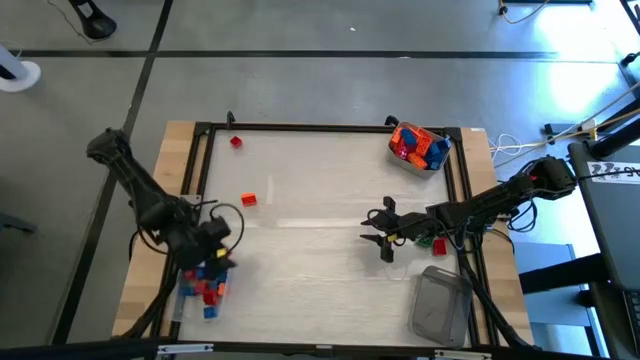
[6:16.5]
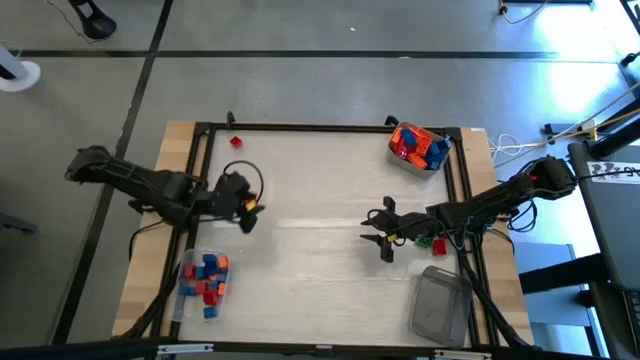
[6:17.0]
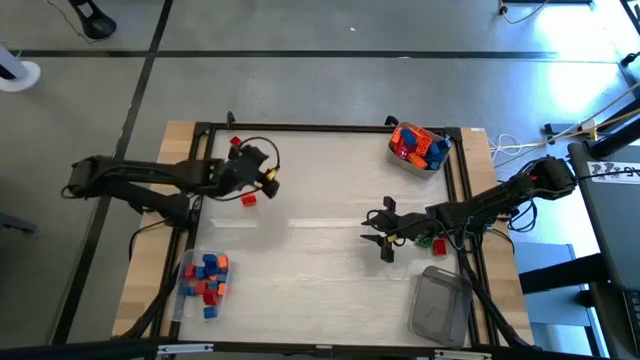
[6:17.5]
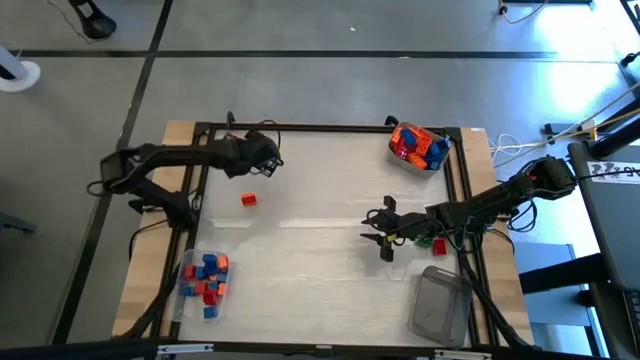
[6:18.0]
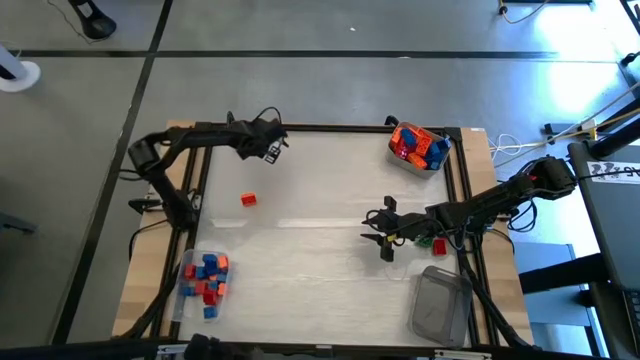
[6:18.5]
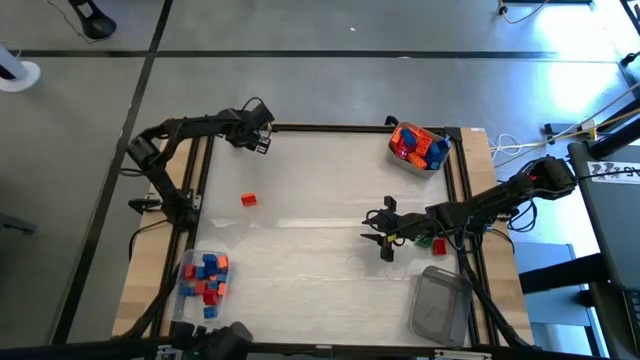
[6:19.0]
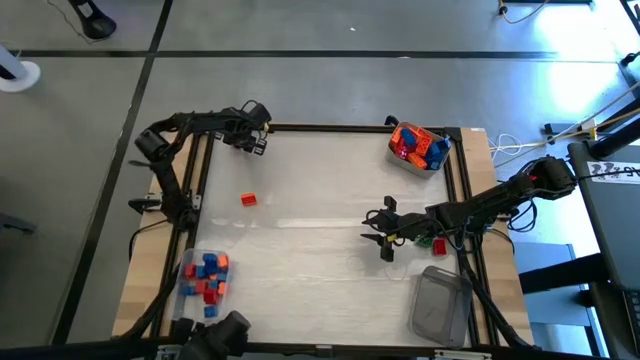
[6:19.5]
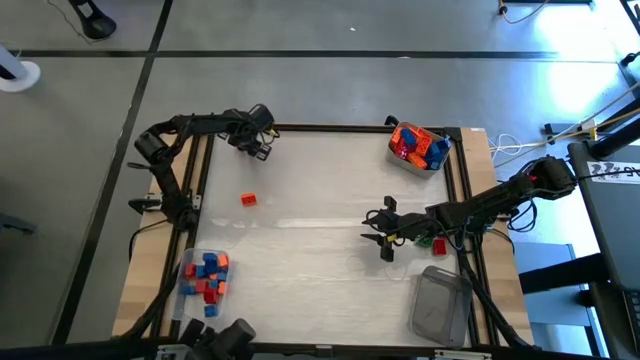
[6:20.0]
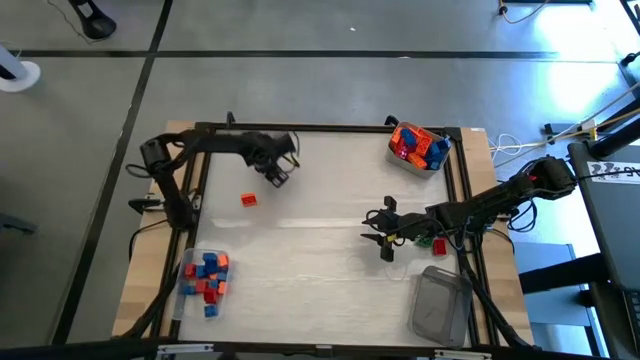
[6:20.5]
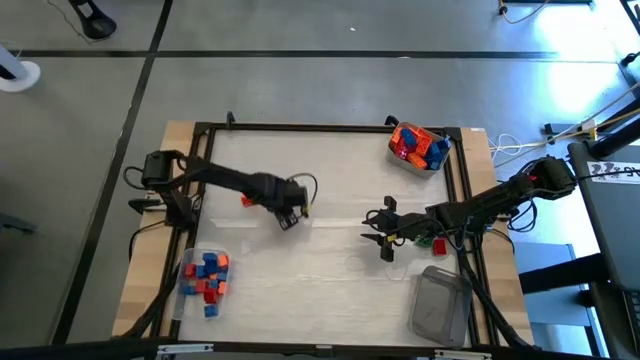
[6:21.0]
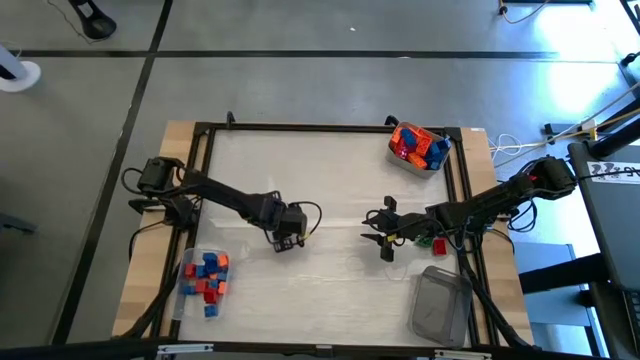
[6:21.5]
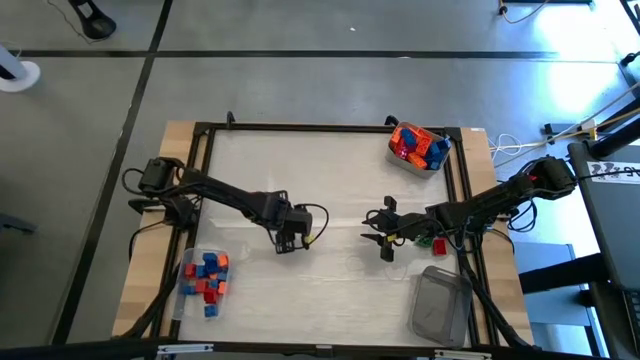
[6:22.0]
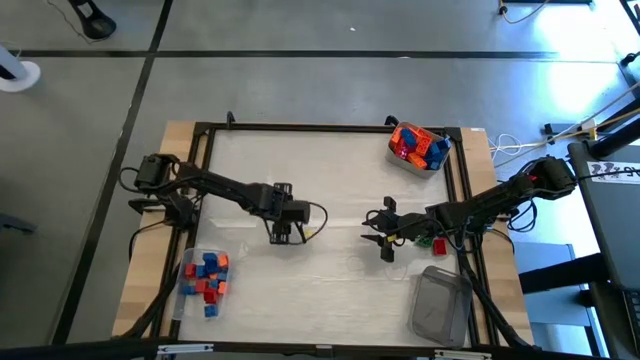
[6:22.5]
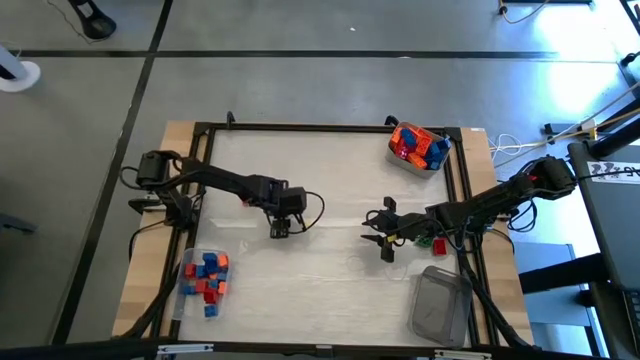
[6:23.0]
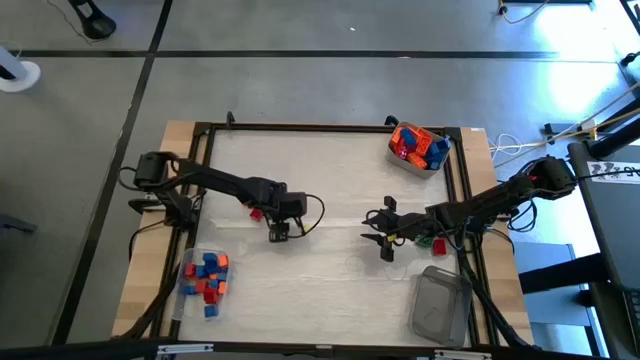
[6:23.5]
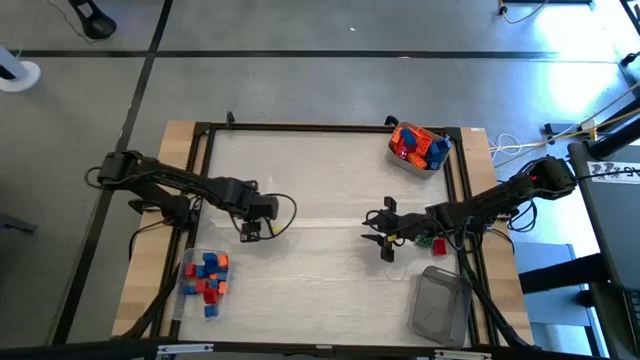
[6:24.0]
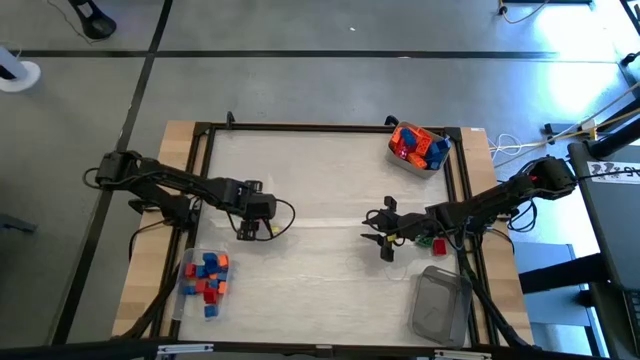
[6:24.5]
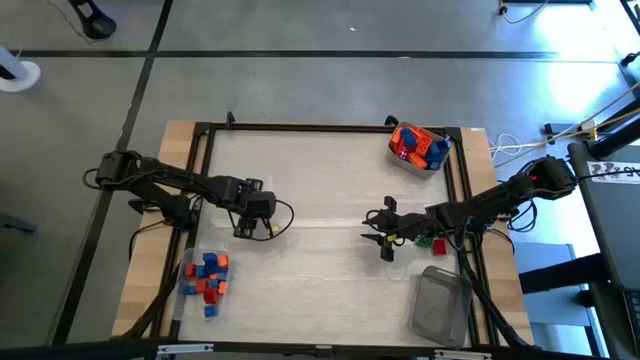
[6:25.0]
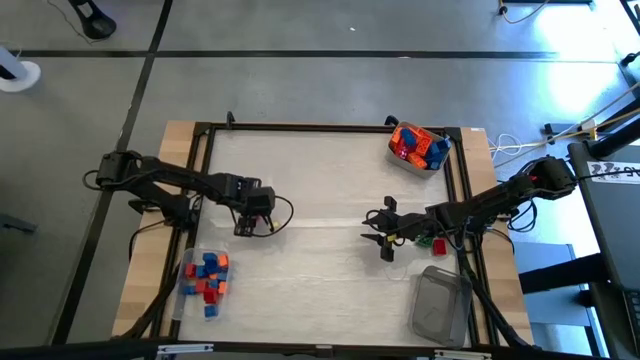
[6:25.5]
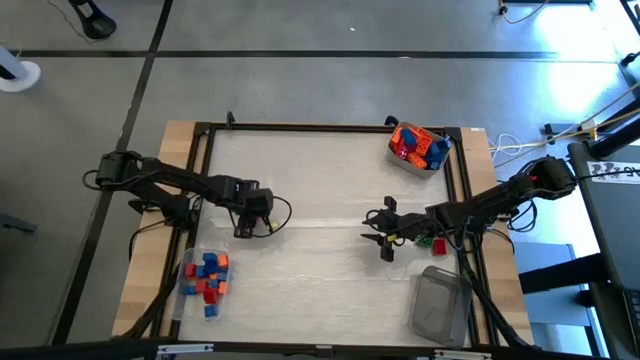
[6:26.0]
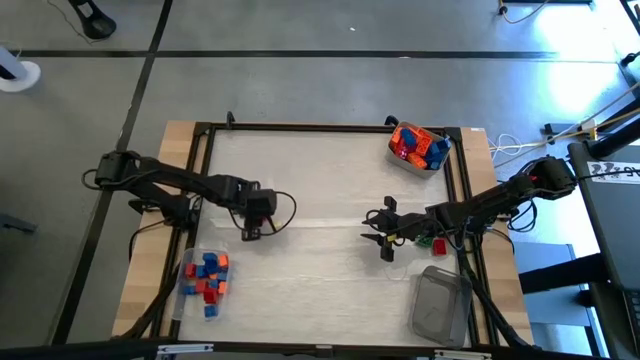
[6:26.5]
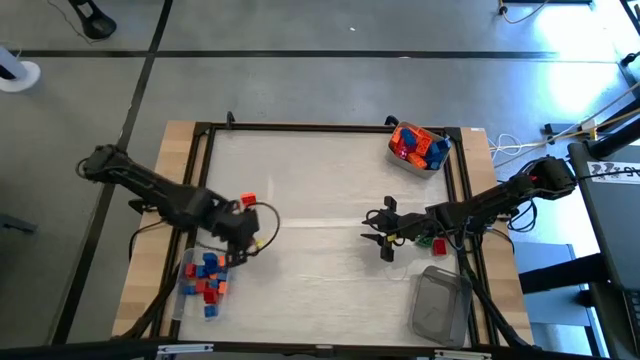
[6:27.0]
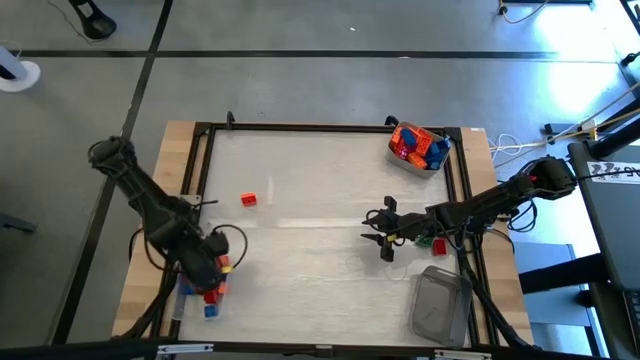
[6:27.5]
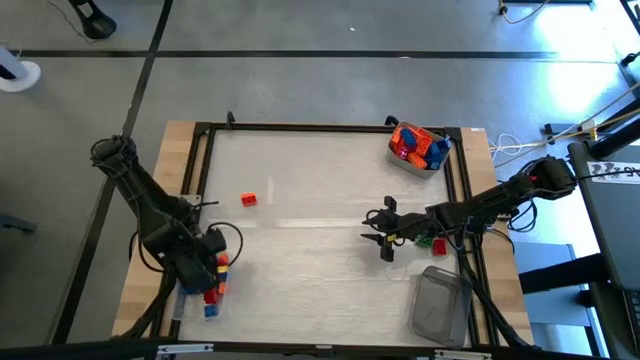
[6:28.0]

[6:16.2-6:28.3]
Task: Sort blocks by size
Put the red game piece into the transparent bin

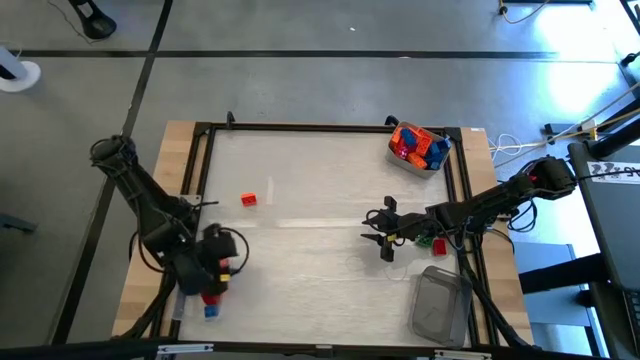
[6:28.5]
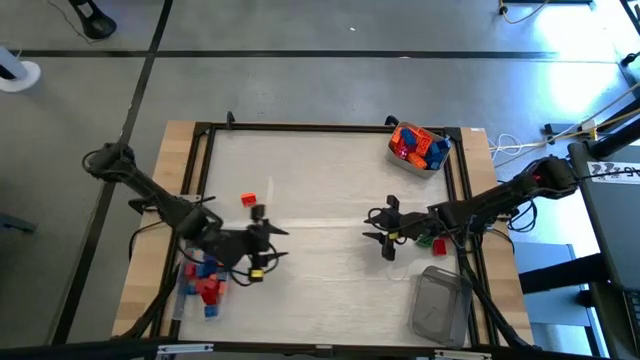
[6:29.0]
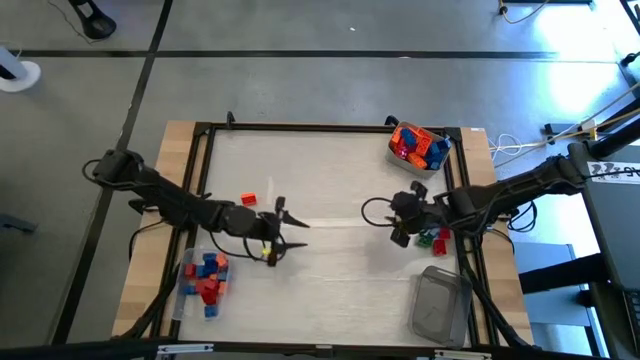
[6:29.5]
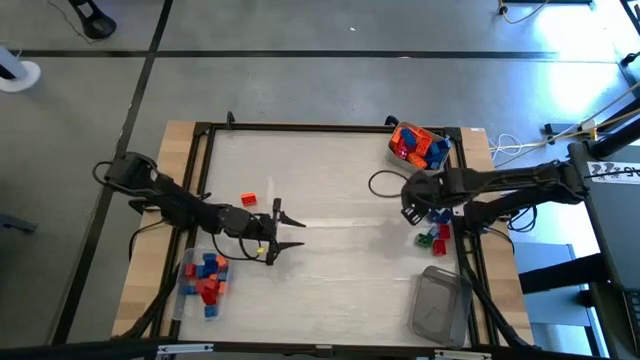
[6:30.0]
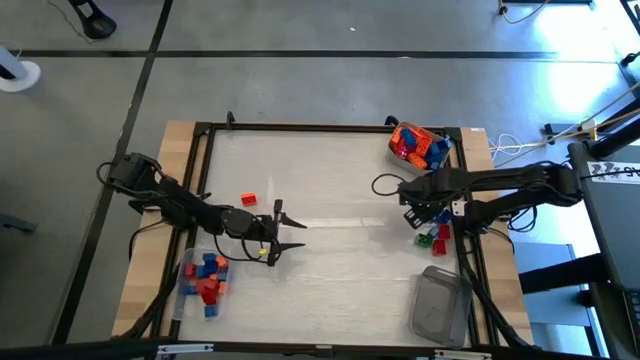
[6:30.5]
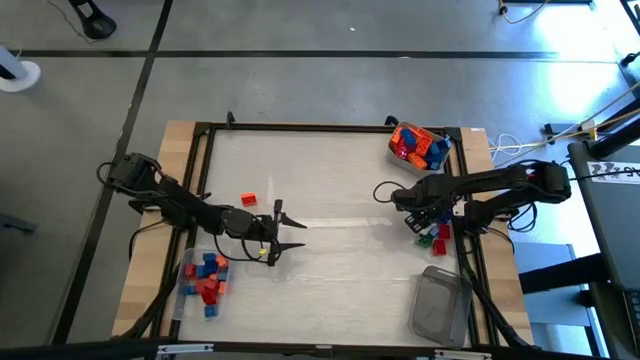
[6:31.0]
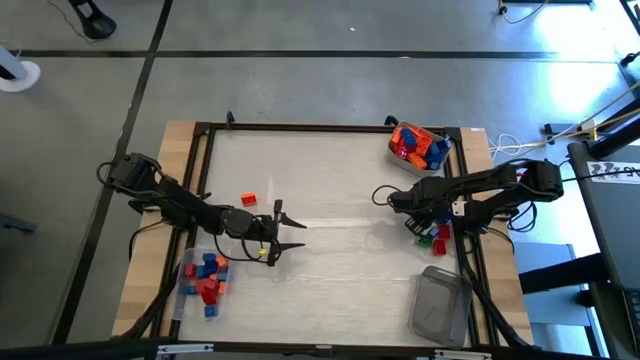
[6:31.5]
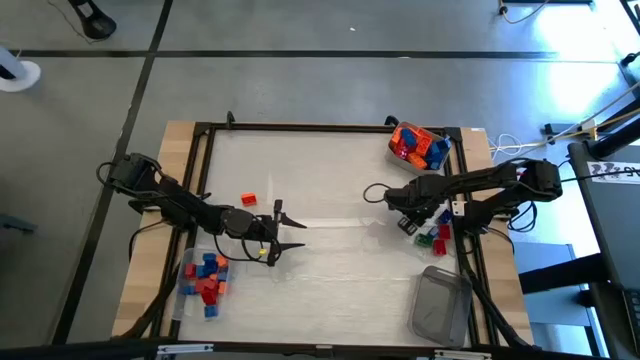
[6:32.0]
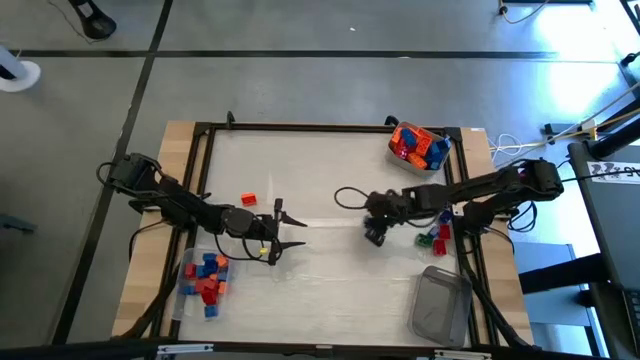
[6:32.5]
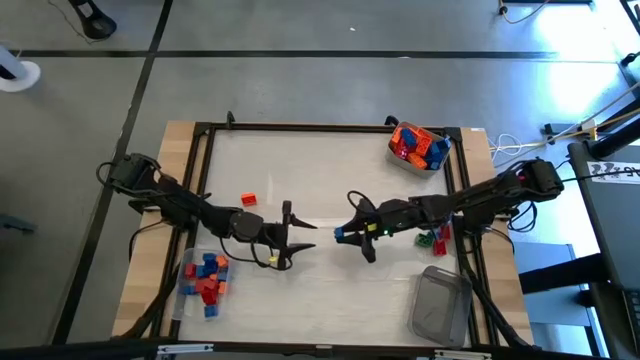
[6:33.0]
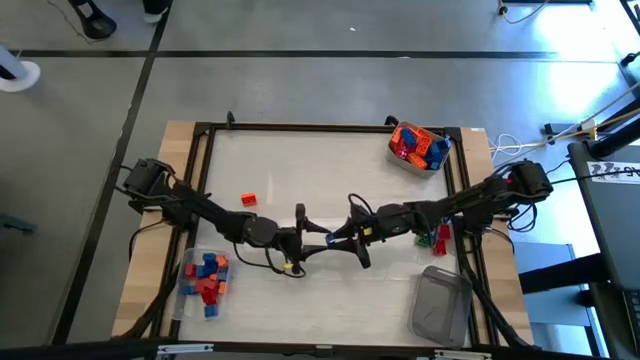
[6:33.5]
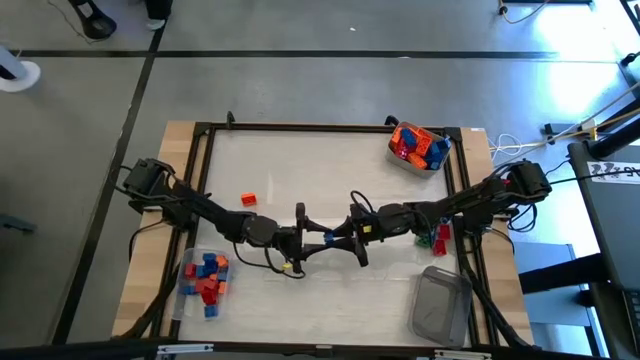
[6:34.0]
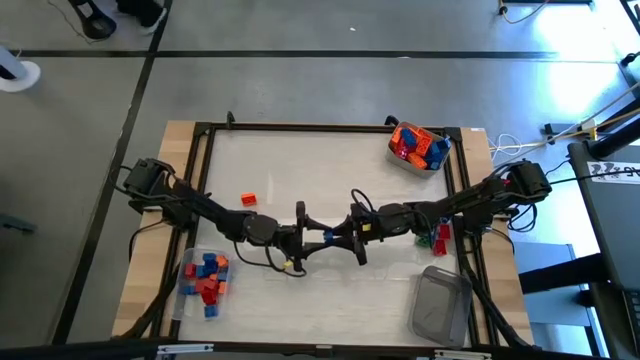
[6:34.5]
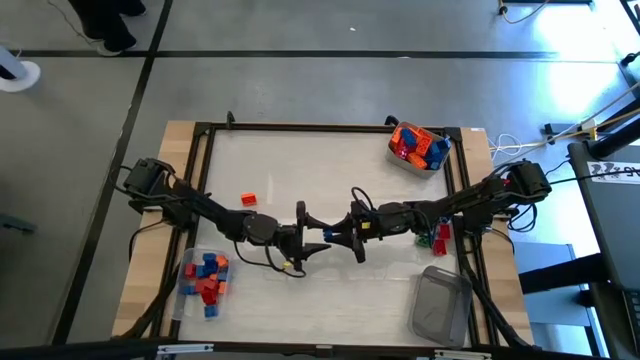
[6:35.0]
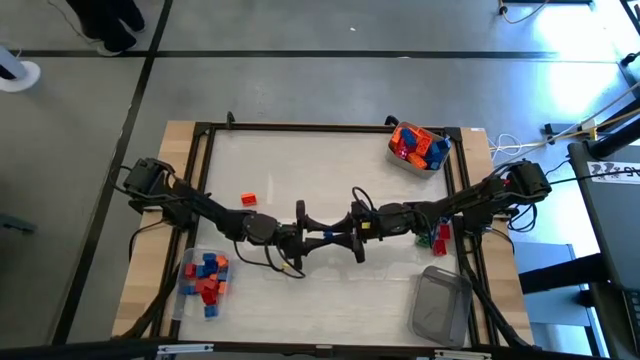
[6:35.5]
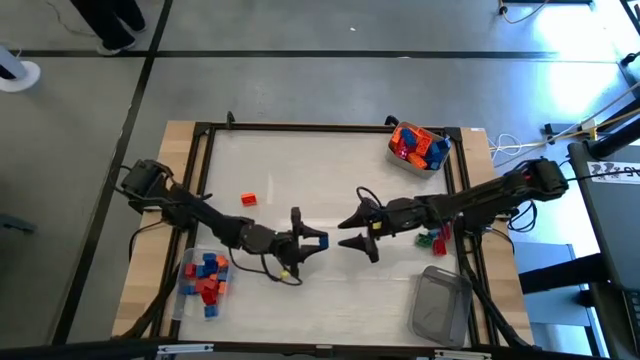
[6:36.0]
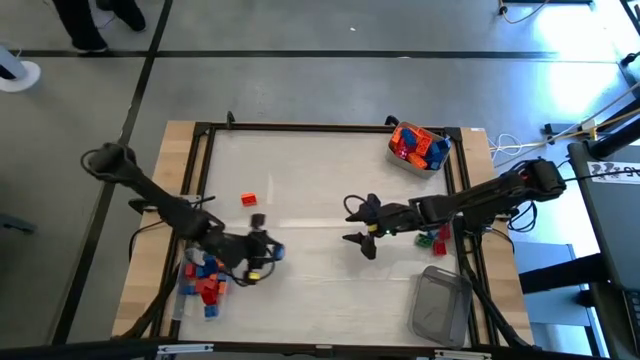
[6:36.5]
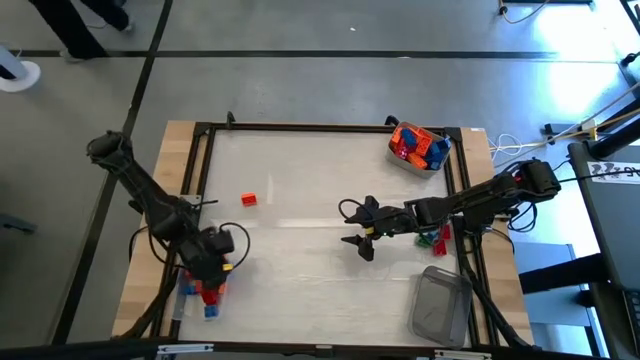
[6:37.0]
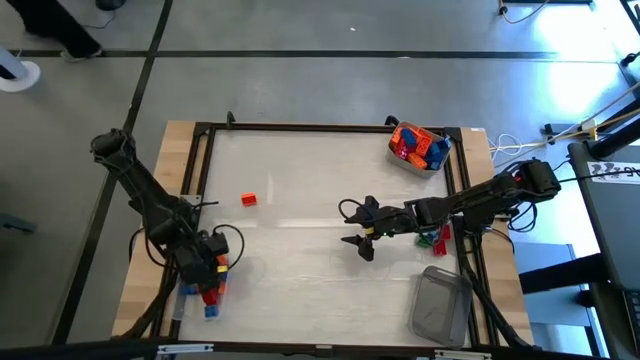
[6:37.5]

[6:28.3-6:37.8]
Put the blue game piece into the transparent bin
